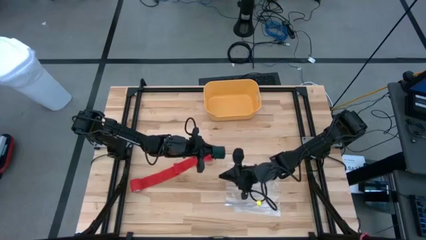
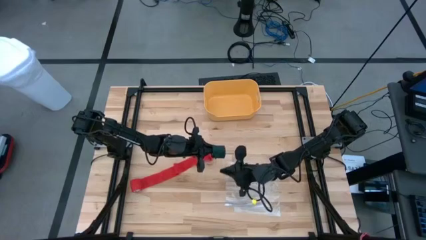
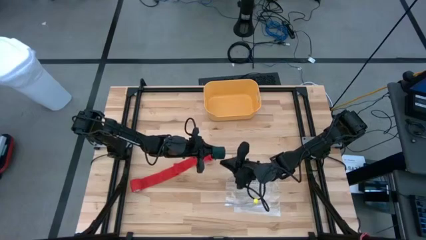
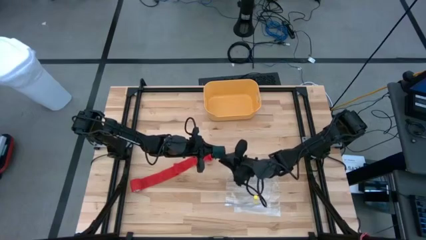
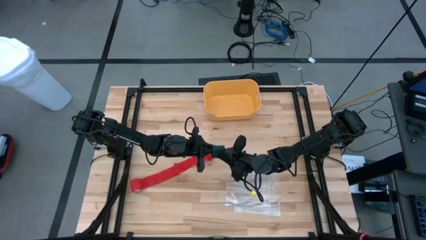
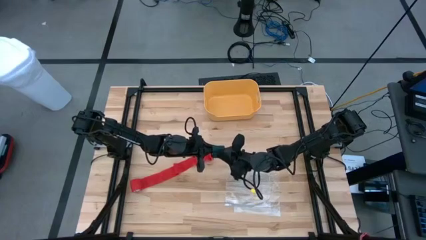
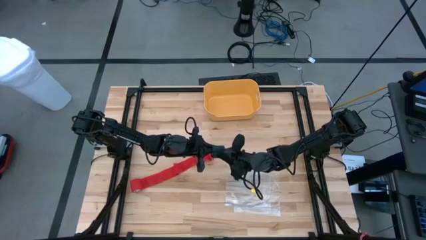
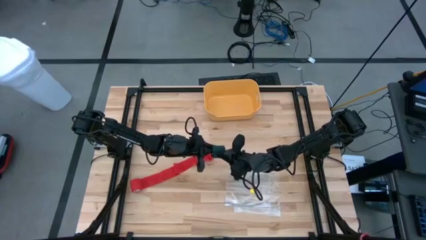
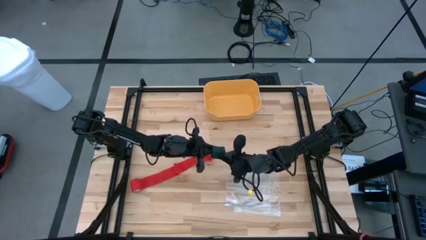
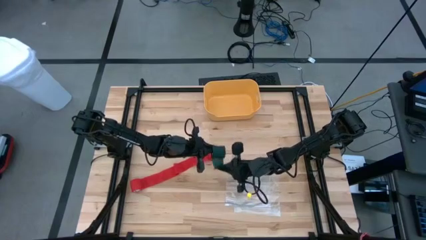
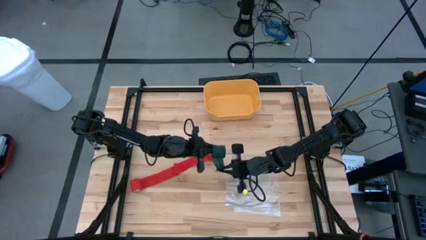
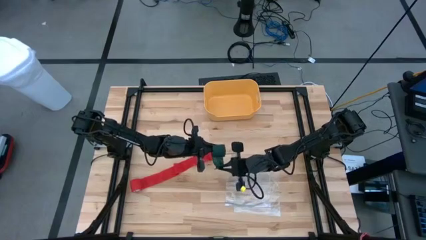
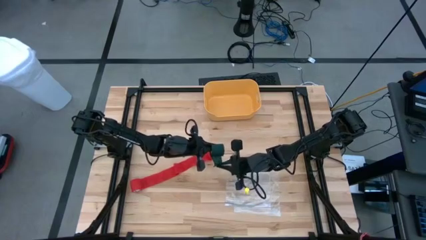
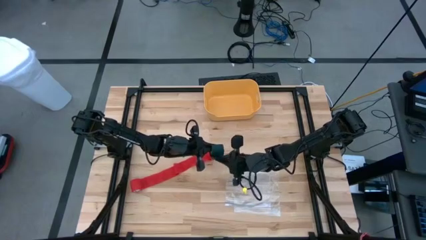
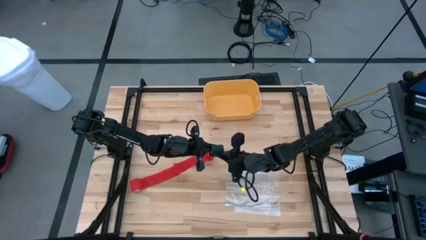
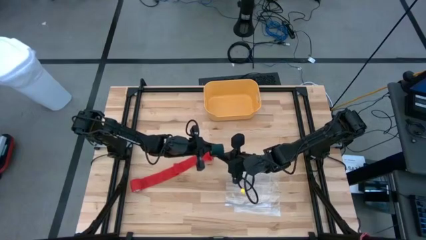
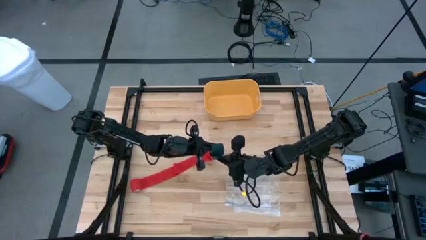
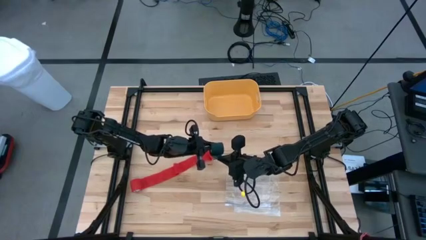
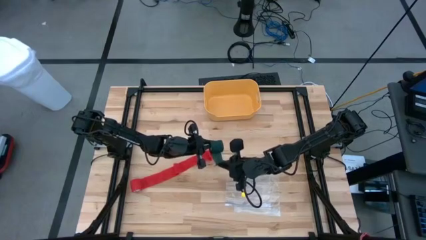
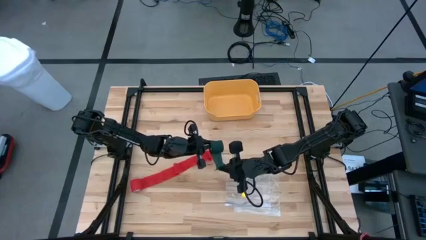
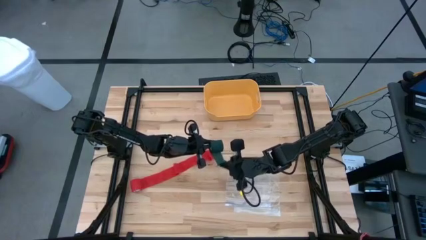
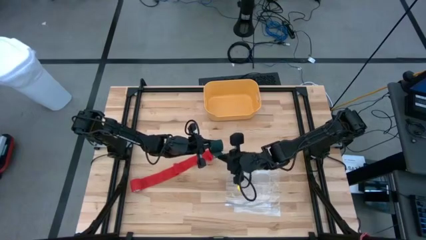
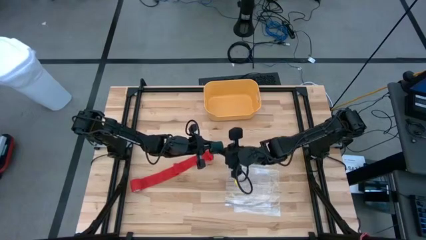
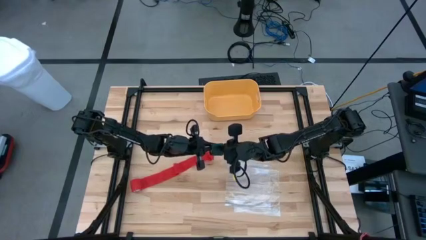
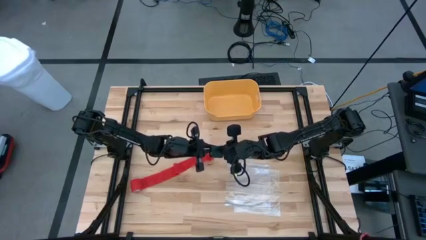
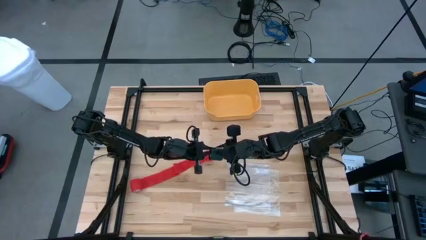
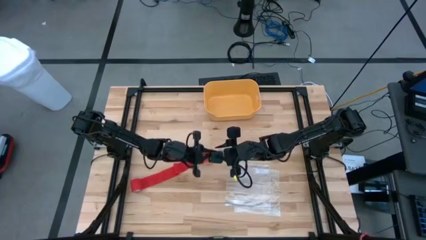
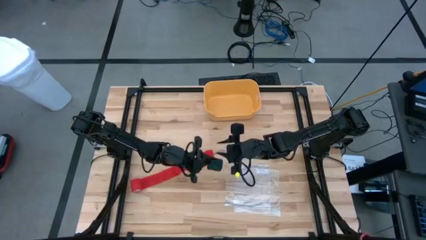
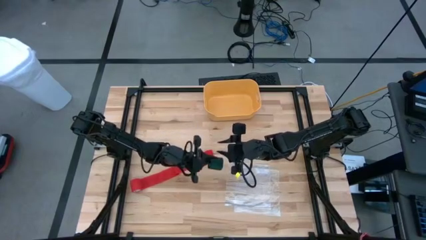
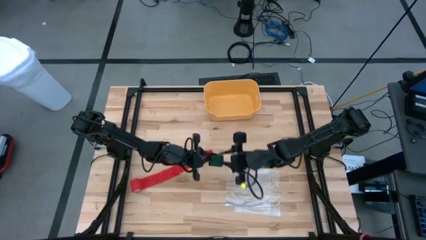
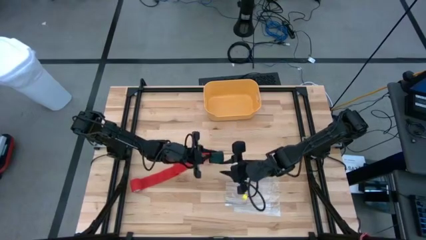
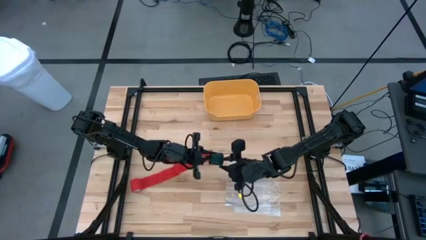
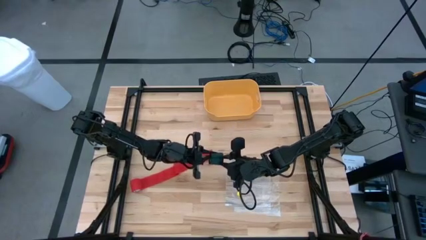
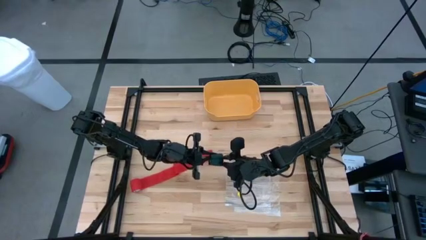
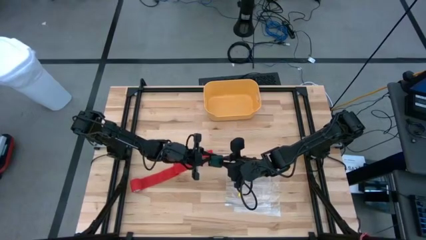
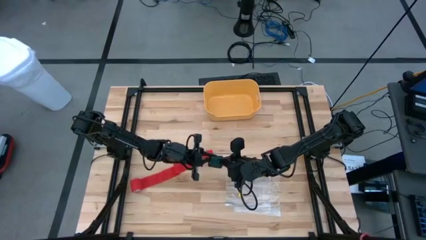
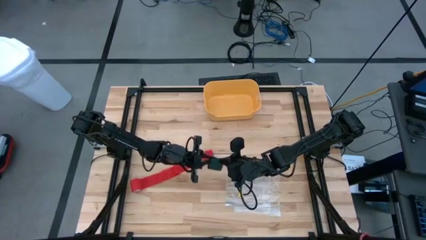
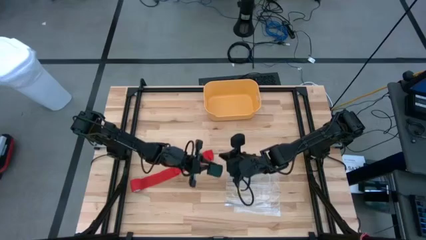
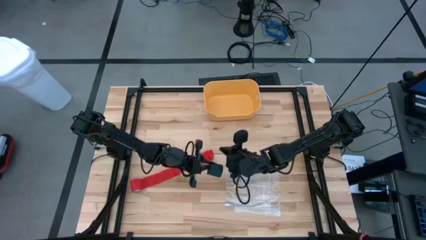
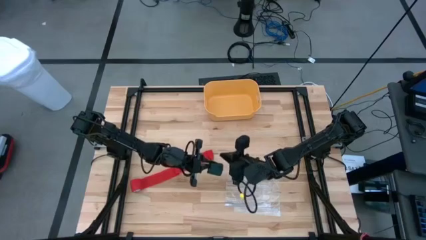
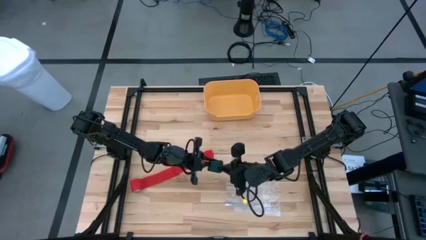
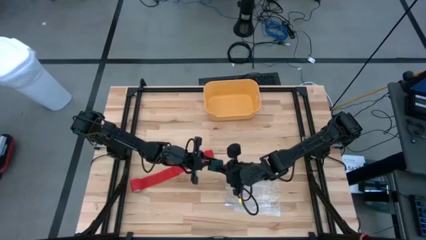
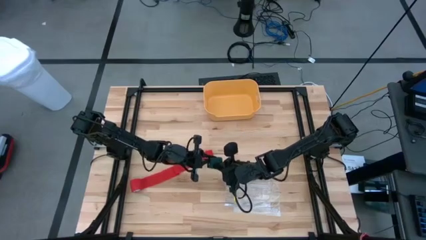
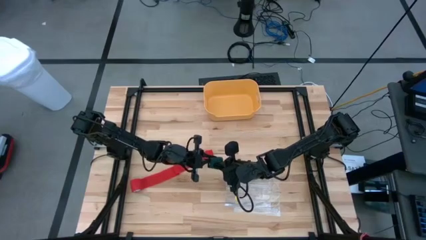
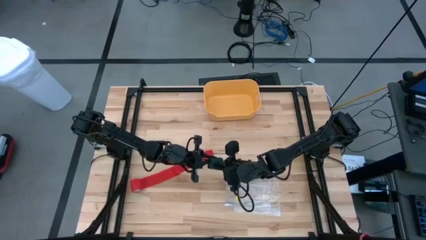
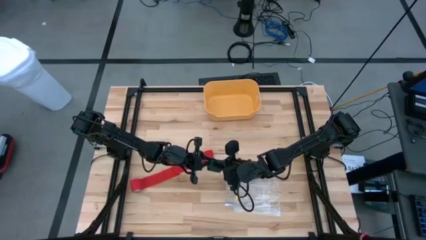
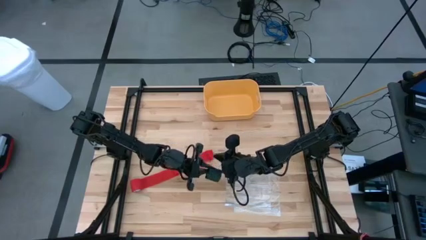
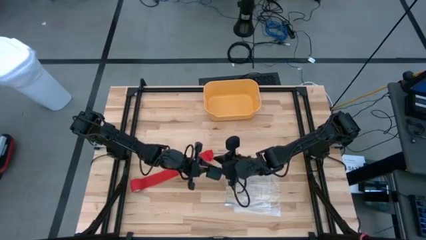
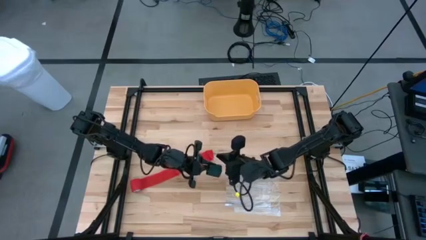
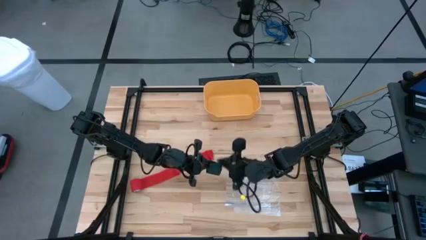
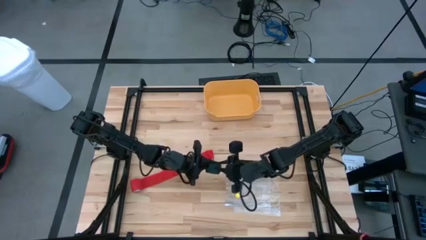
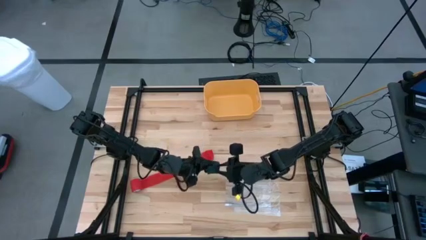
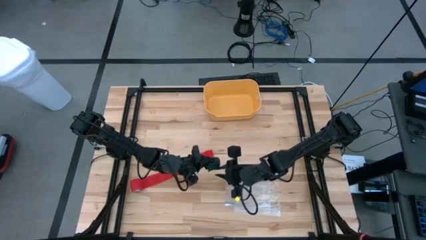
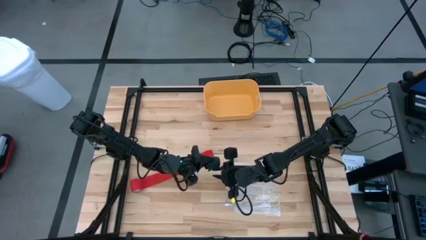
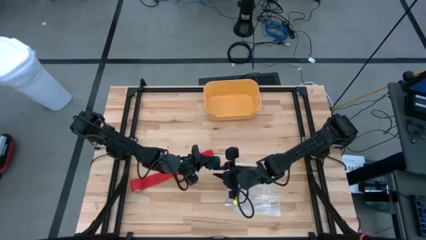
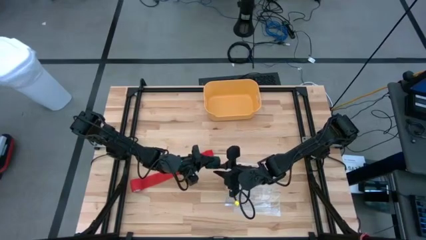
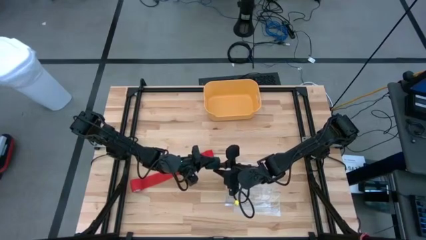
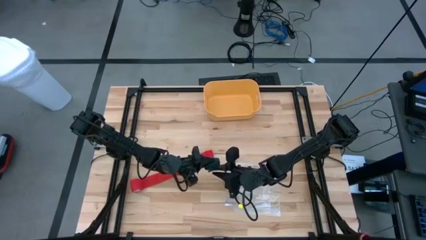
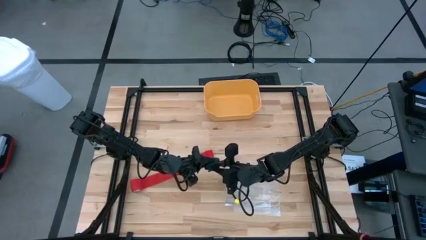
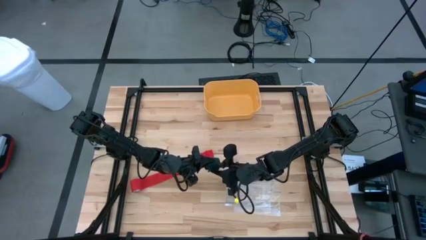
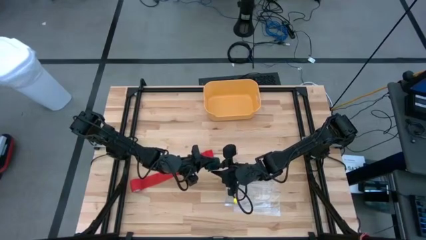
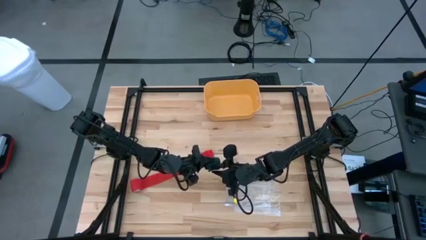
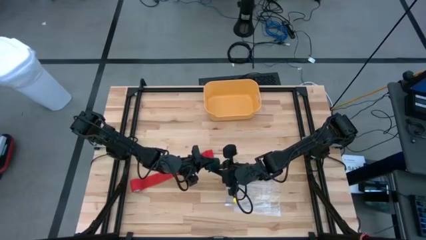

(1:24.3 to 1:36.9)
Task: Roll bandage
Roll the green bandage
